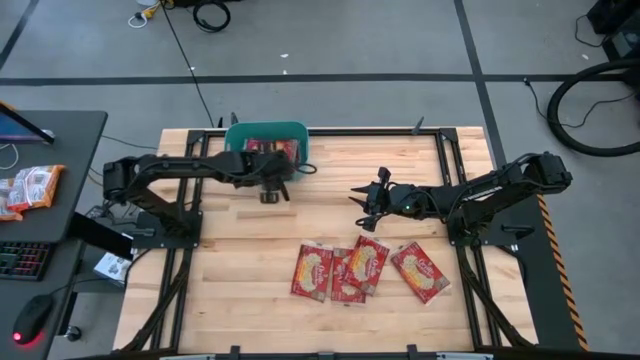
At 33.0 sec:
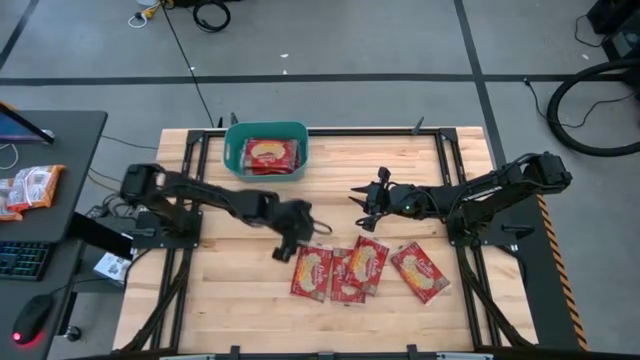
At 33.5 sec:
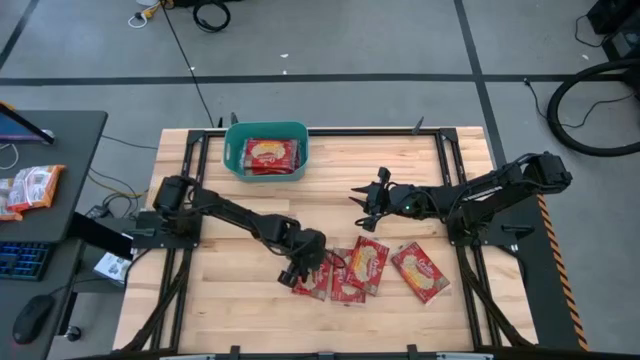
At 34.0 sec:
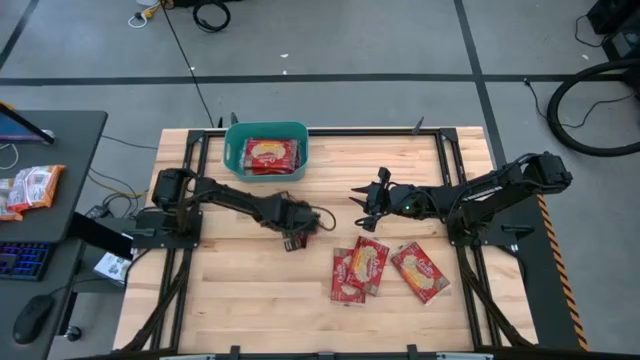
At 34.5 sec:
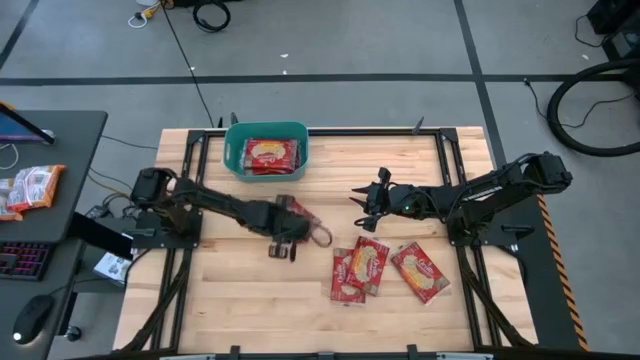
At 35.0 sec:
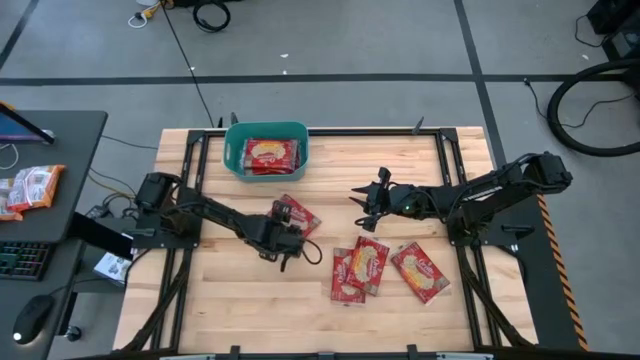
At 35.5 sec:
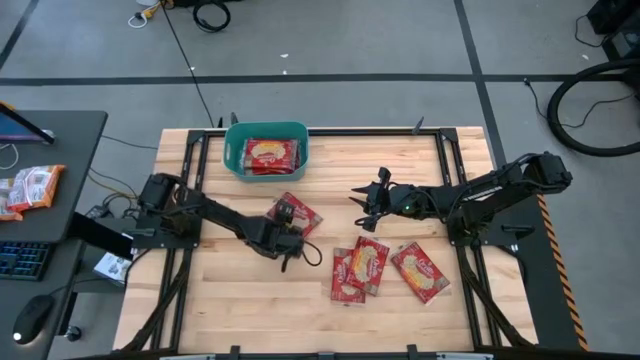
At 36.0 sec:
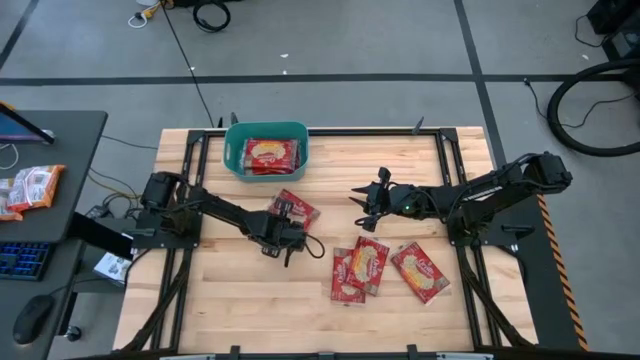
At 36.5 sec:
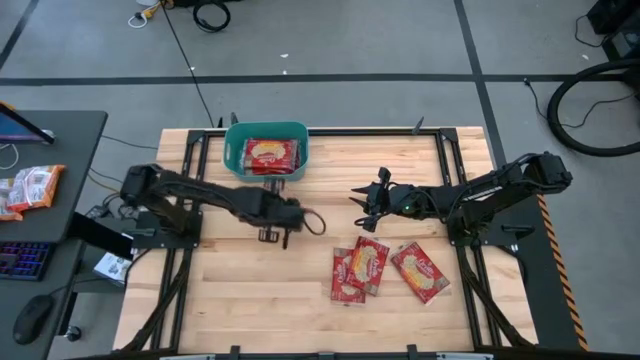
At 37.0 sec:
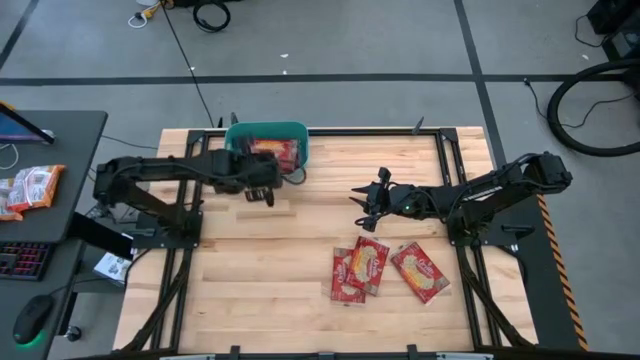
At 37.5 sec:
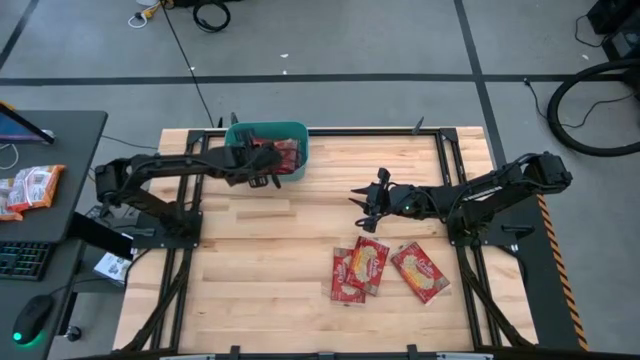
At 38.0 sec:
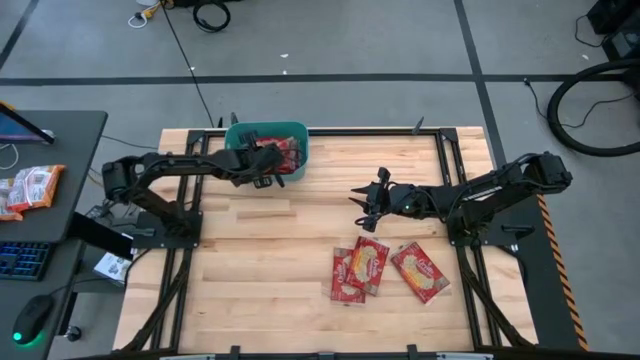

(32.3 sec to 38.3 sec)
Task: Sort popcorn bags into baskets
Put the left red popcorn bag into the green bin

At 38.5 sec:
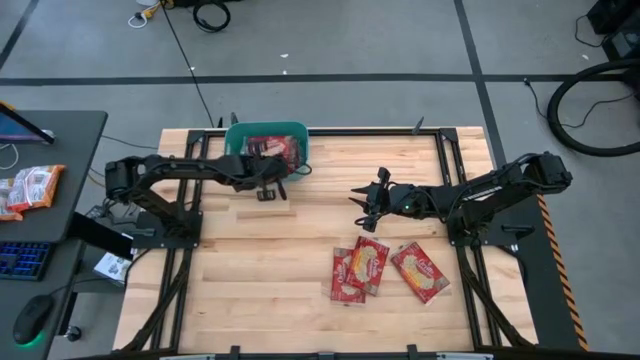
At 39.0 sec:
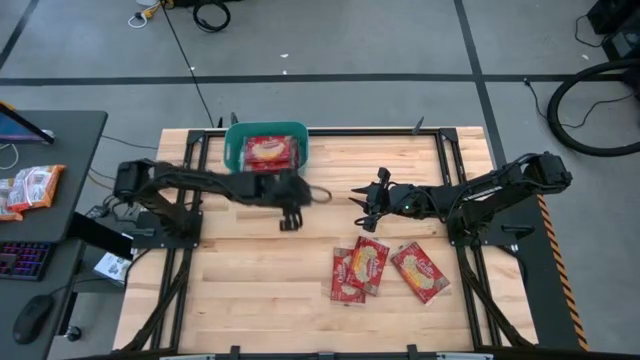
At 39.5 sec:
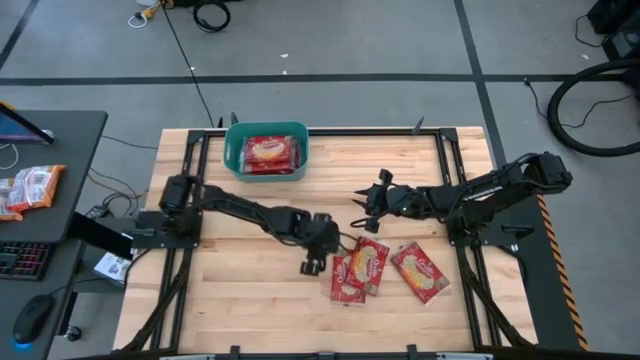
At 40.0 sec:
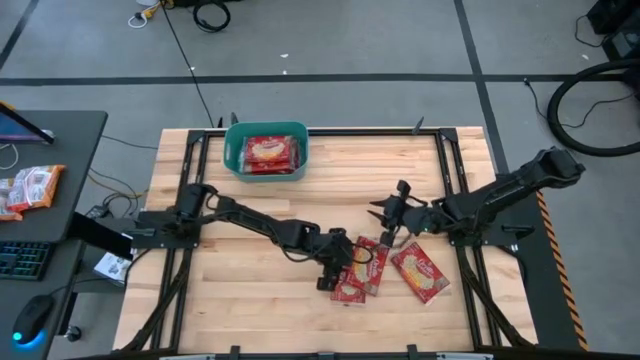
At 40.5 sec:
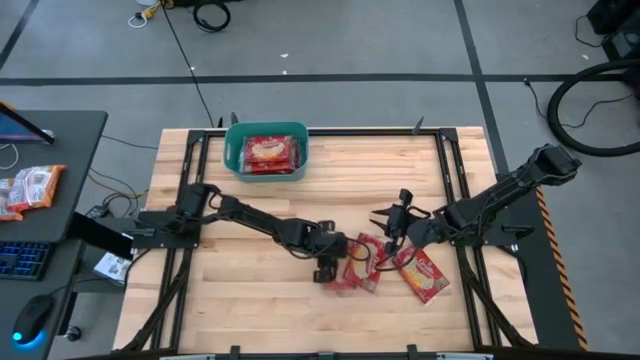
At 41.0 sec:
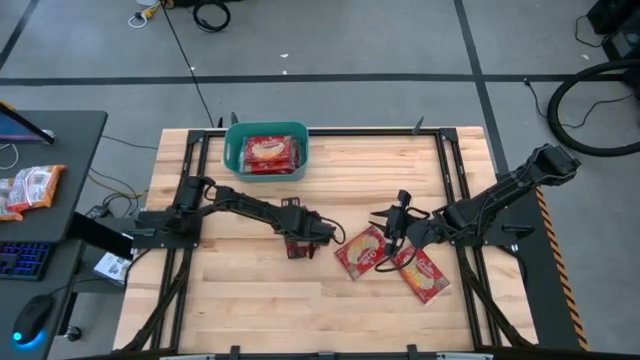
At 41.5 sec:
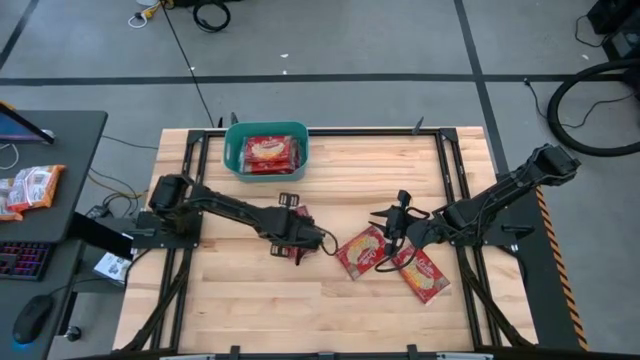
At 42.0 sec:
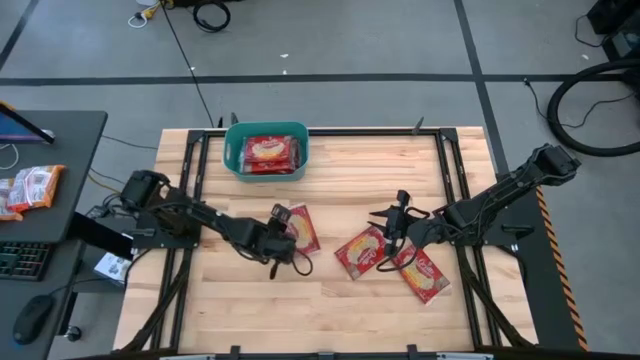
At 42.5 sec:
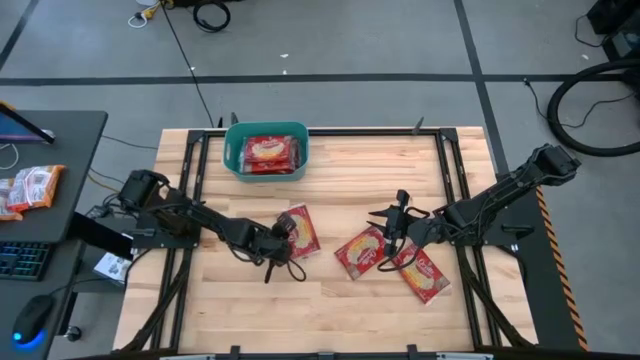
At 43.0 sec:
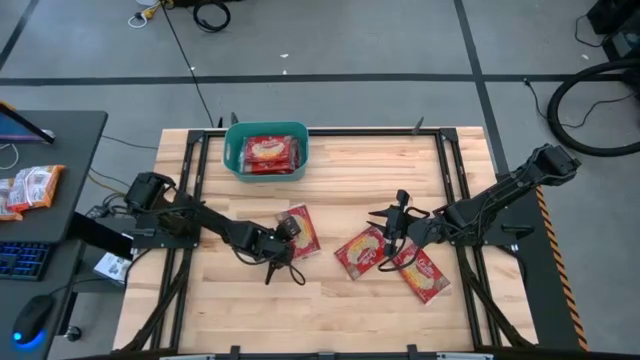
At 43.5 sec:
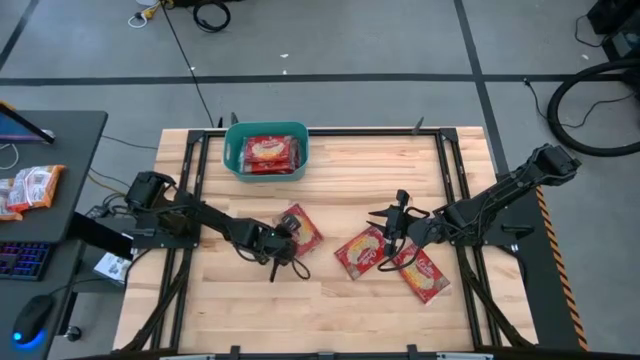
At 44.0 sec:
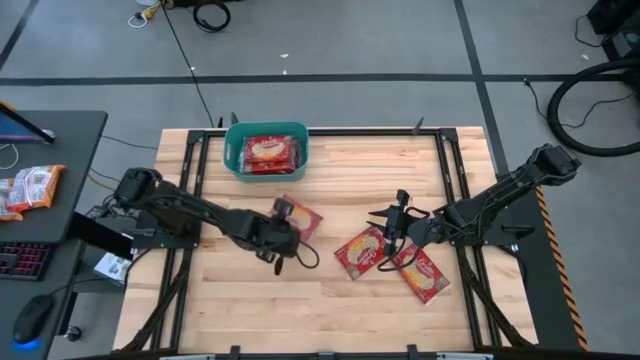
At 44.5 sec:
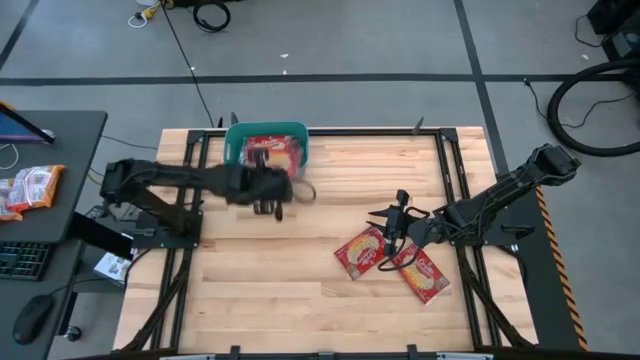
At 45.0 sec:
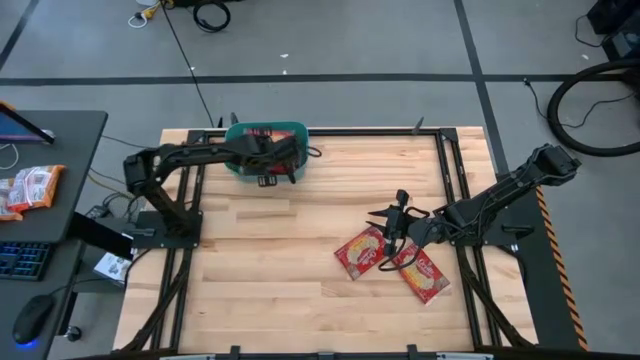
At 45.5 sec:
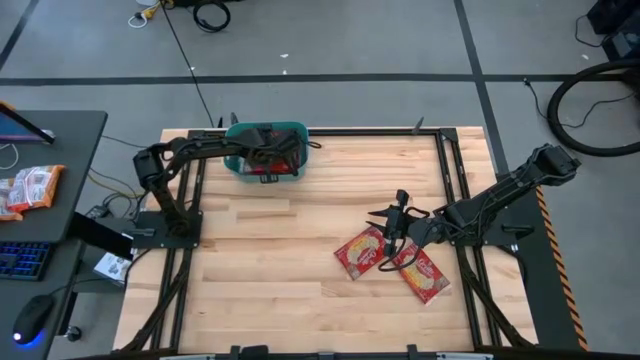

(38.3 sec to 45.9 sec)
Put the bottom left red popcorn bag into the green bin

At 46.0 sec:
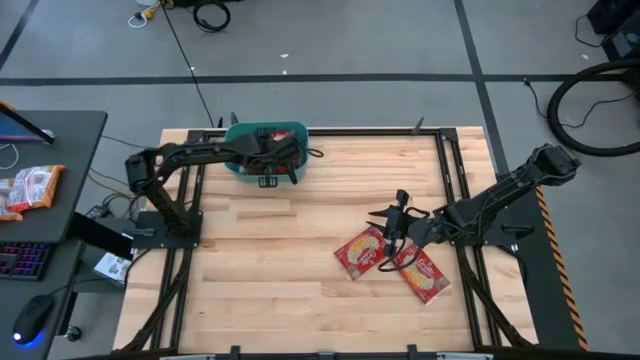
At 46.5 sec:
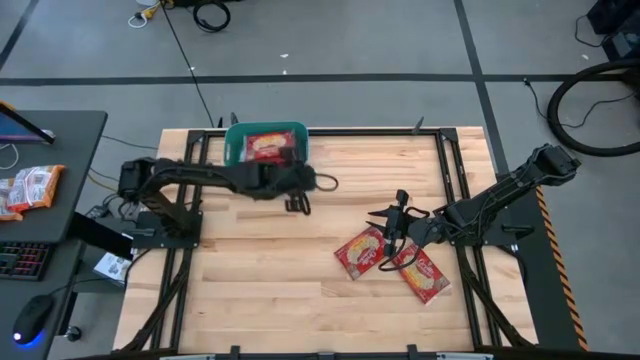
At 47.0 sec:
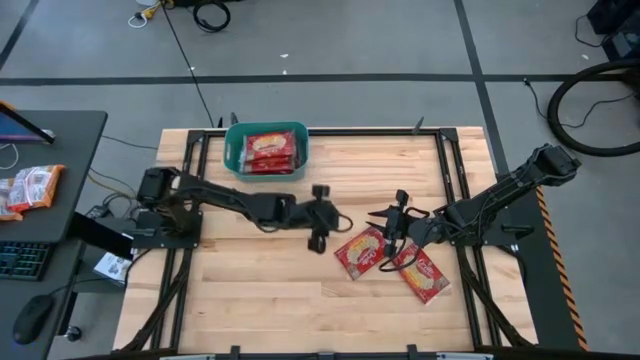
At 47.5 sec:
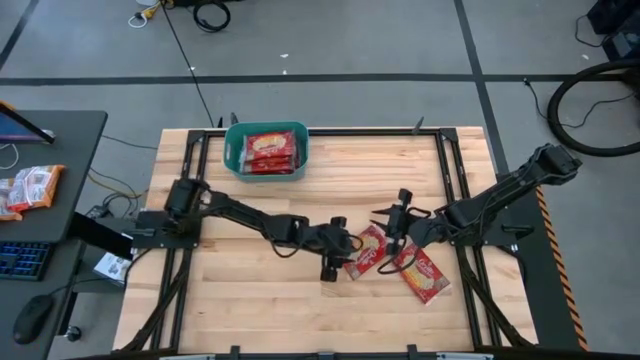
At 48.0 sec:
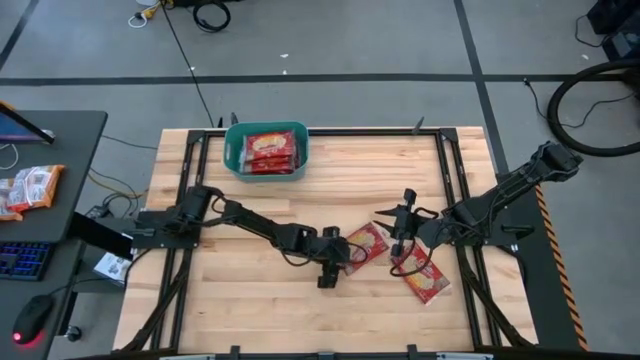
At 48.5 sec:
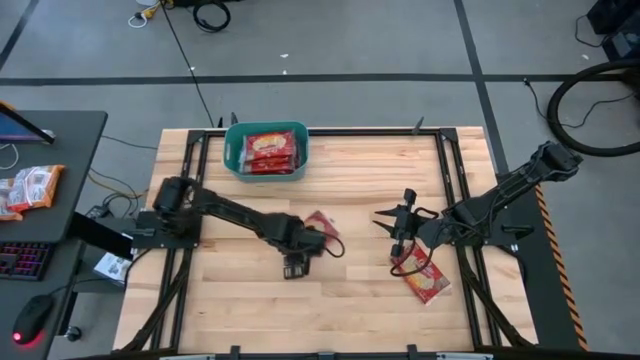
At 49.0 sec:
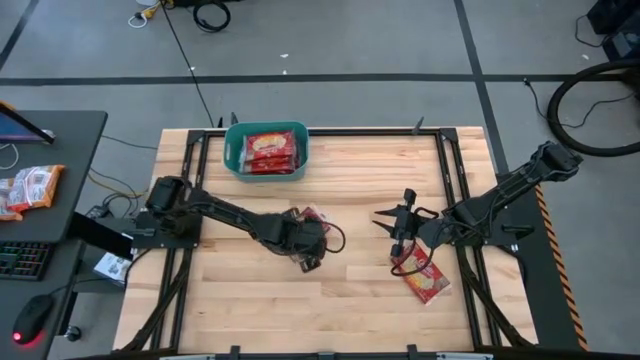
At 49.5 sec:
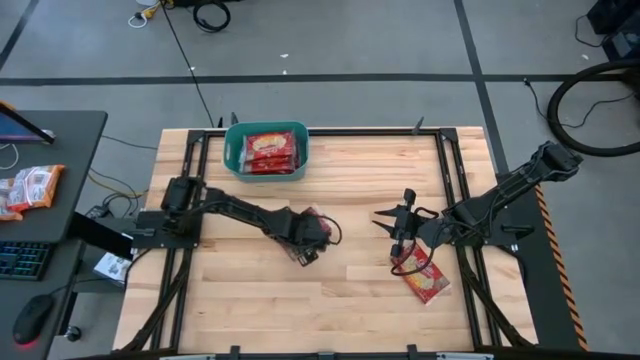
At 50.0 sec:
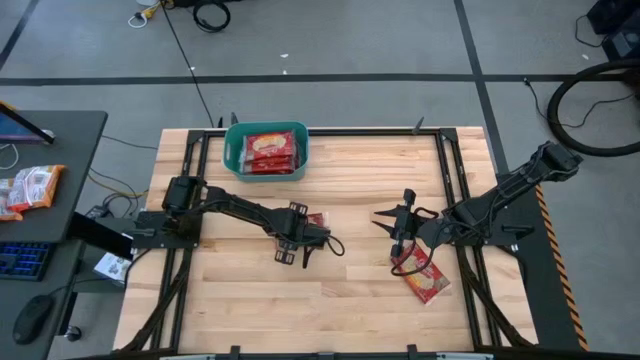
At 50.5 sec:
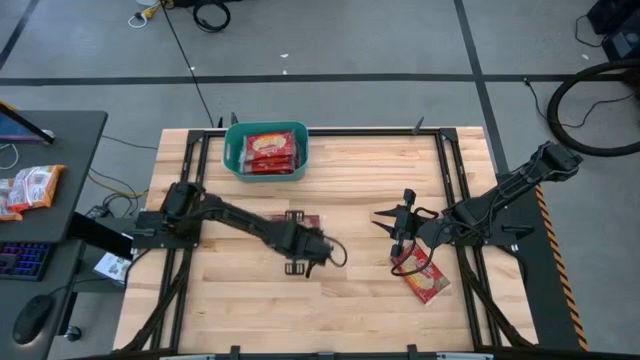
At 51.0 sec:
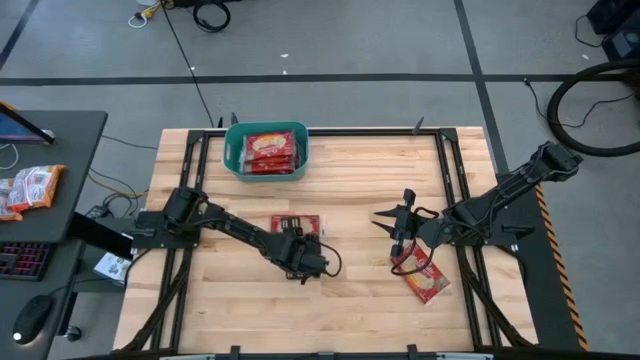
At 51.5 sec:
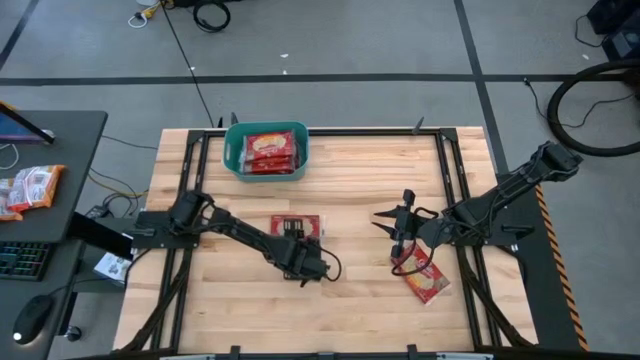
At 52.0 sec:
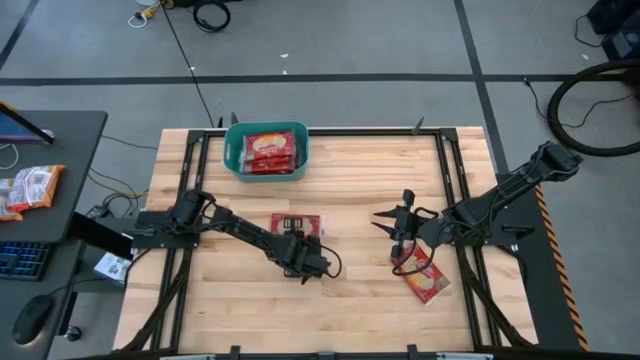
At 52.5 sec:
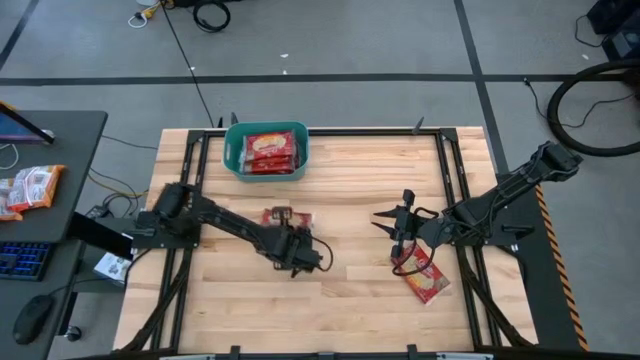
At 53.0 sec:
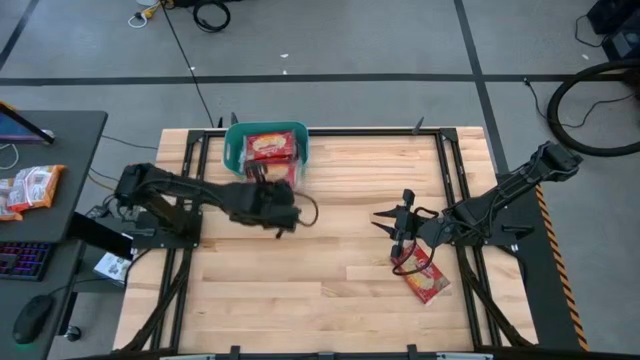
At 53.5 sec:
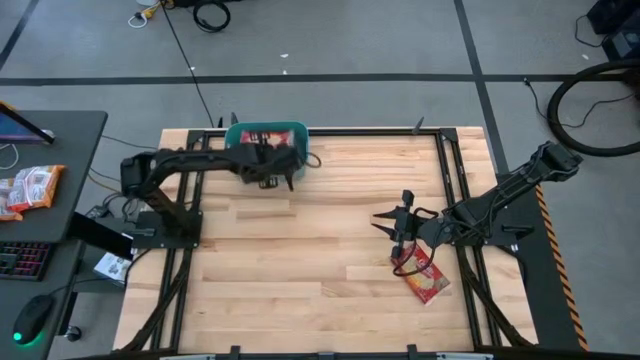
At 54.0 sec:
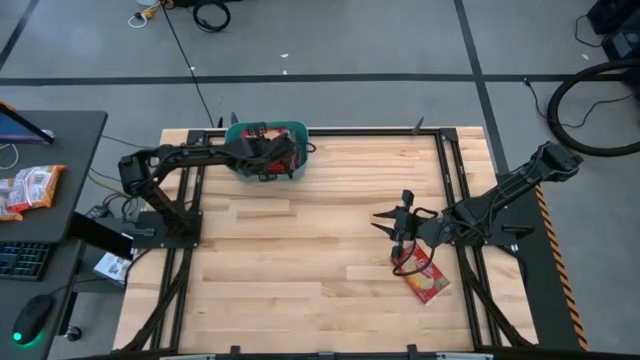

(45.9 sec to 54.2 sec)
Put the left red popcorn bag into the green bin
